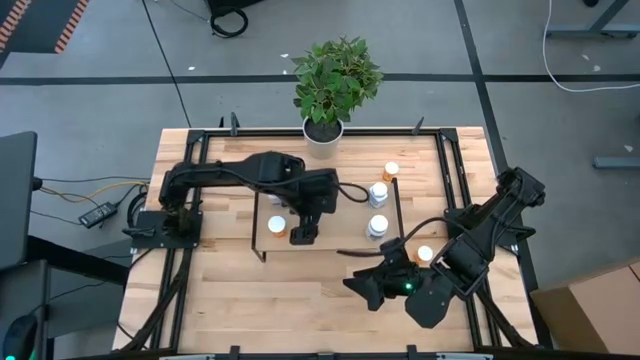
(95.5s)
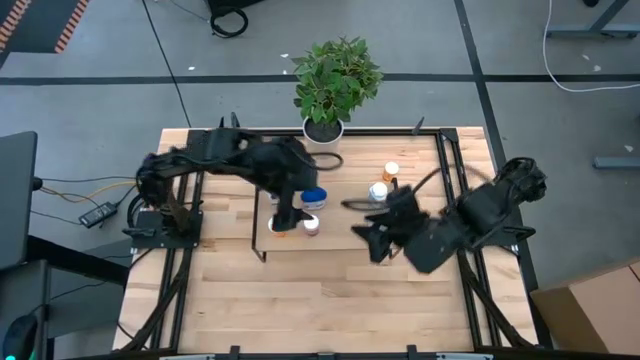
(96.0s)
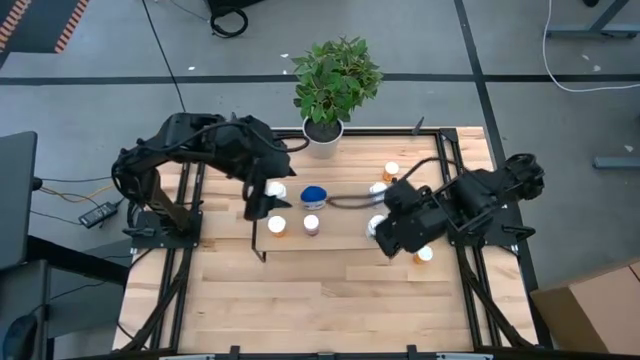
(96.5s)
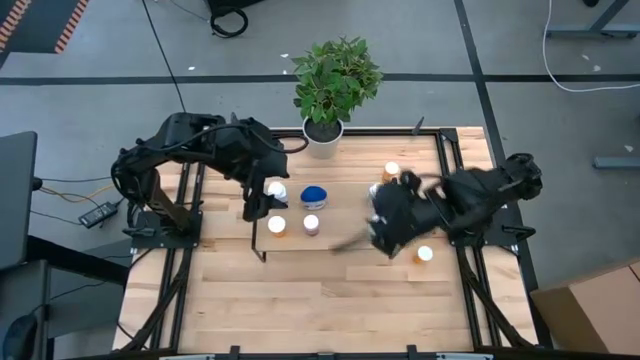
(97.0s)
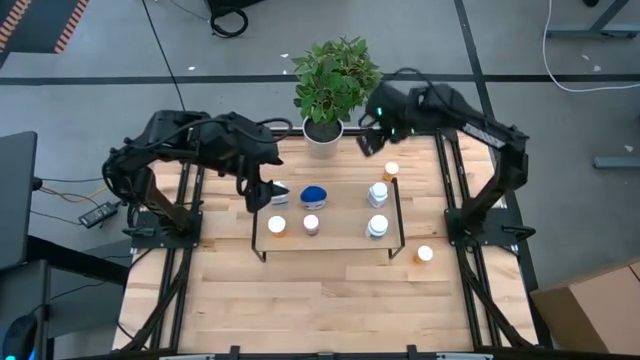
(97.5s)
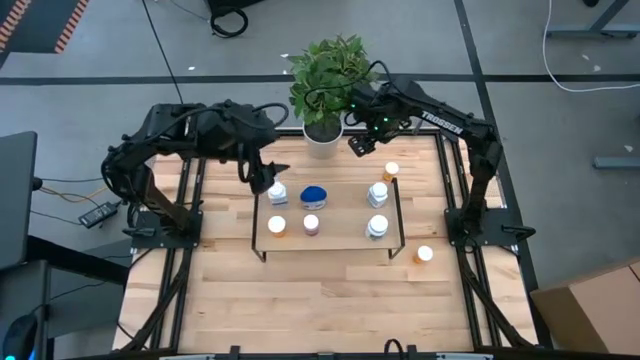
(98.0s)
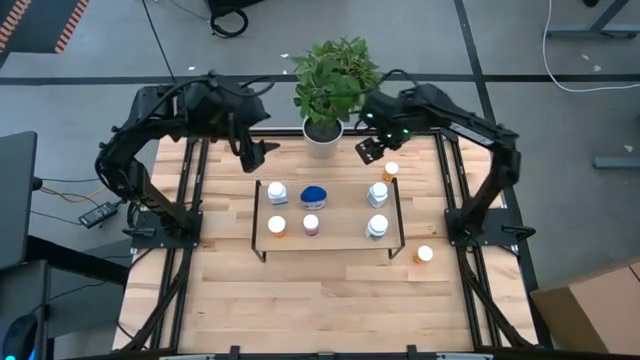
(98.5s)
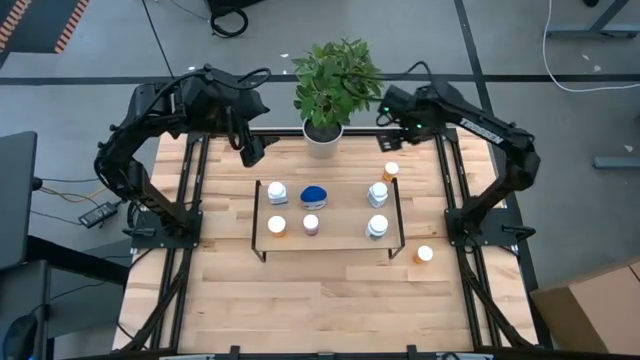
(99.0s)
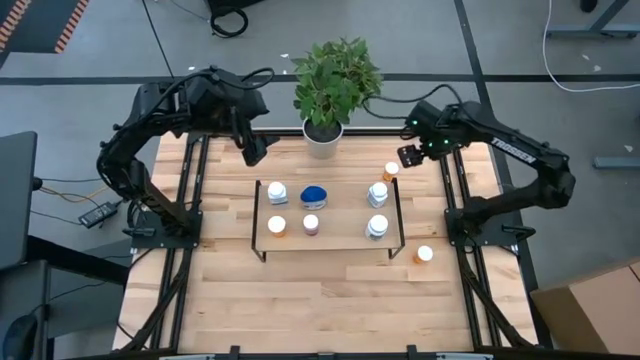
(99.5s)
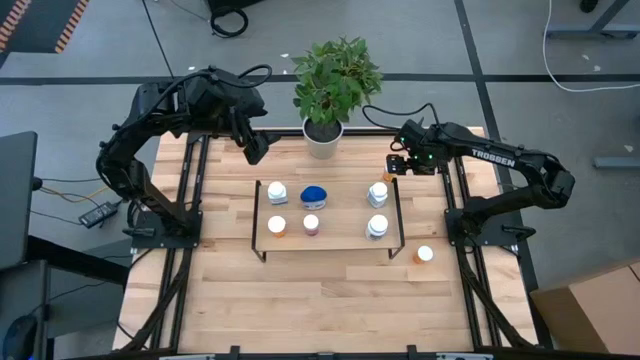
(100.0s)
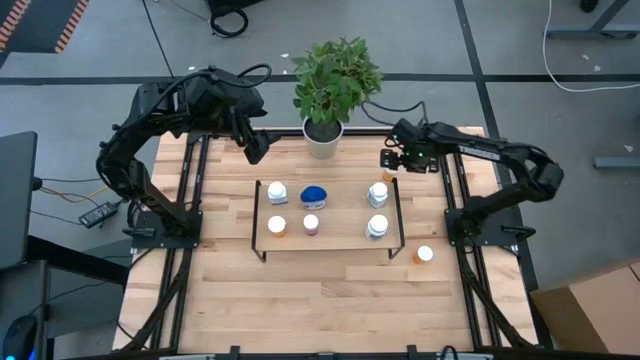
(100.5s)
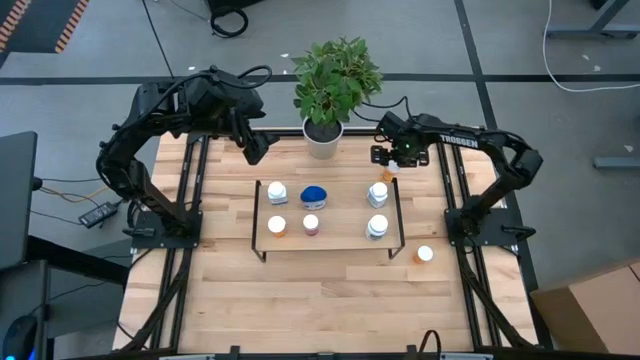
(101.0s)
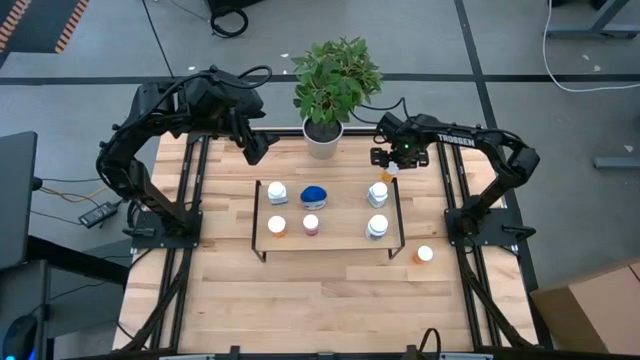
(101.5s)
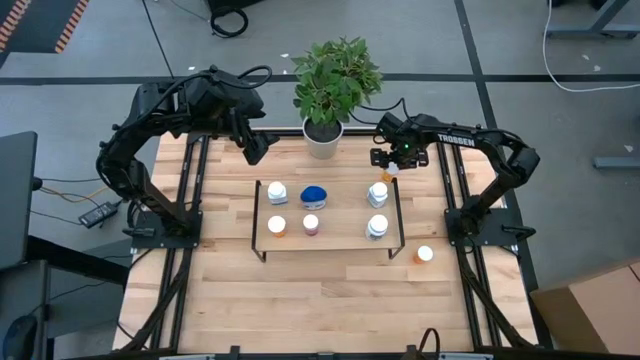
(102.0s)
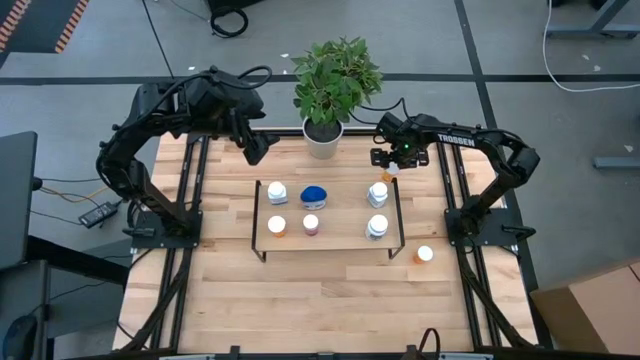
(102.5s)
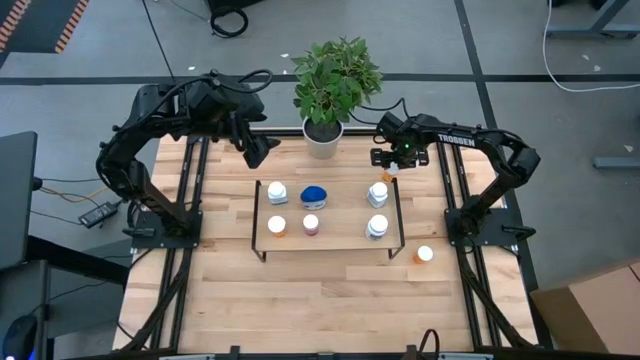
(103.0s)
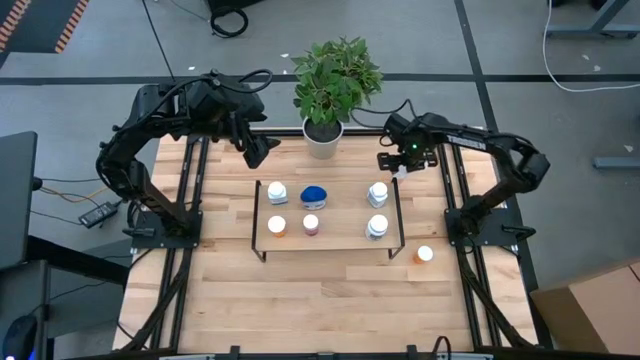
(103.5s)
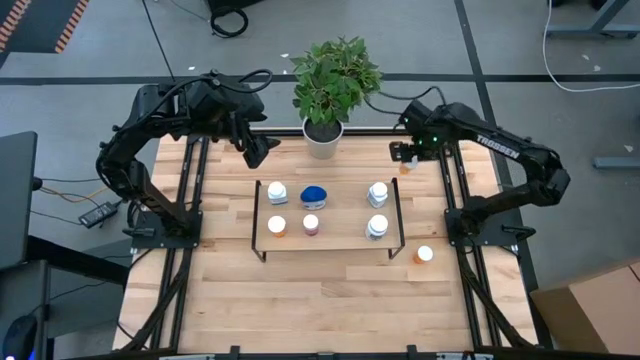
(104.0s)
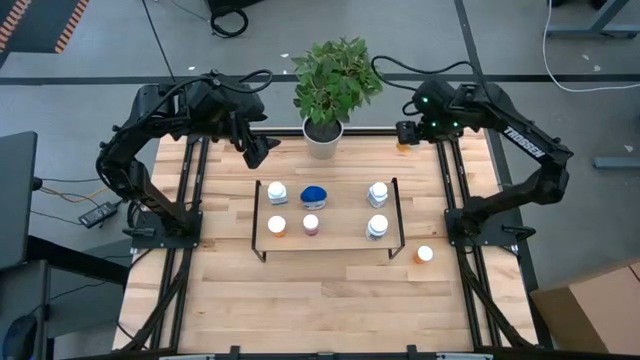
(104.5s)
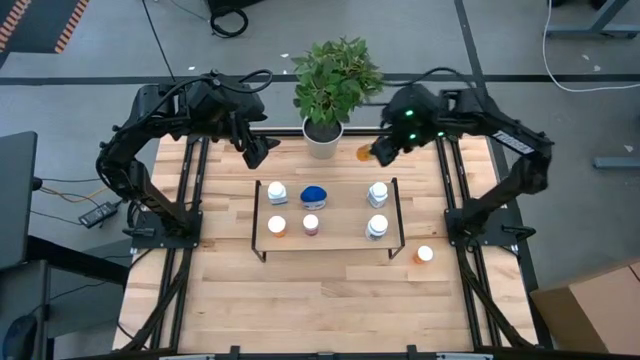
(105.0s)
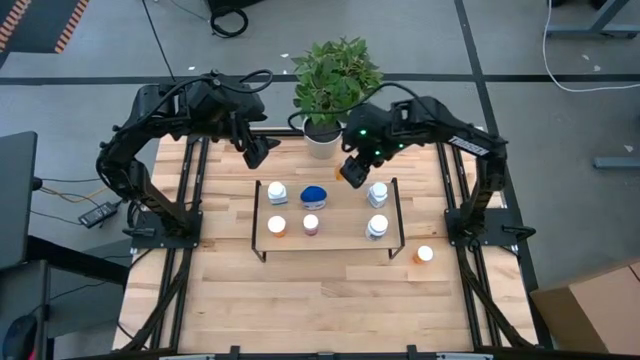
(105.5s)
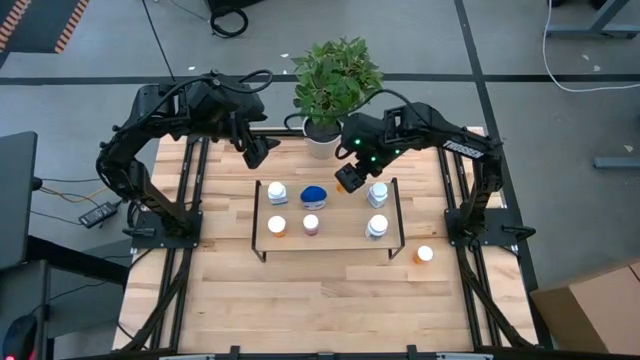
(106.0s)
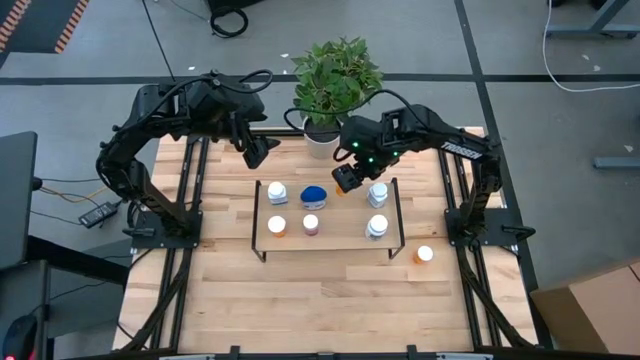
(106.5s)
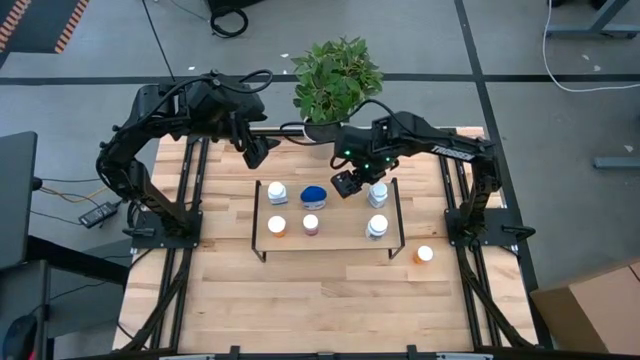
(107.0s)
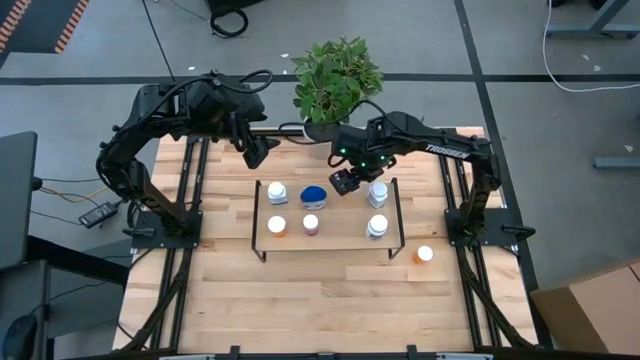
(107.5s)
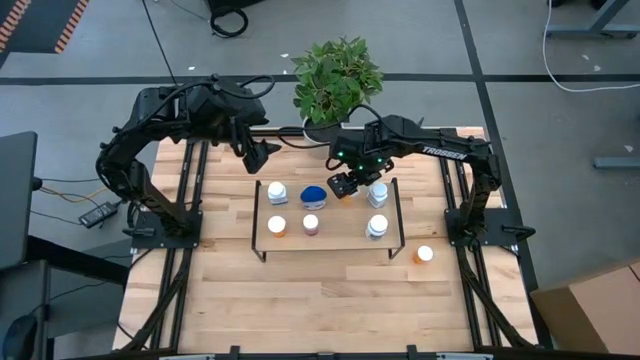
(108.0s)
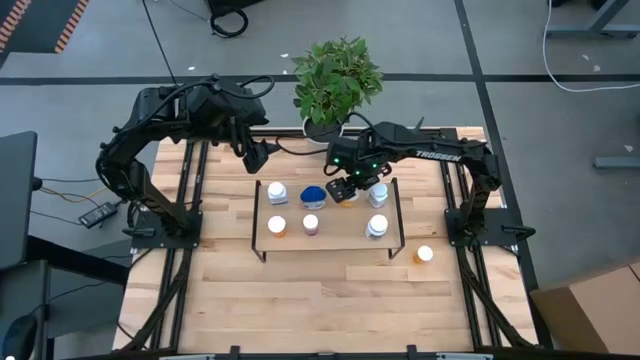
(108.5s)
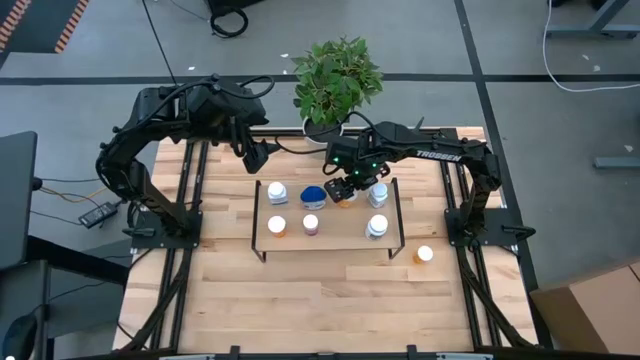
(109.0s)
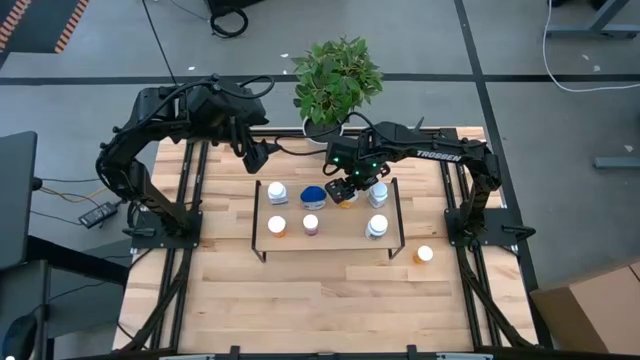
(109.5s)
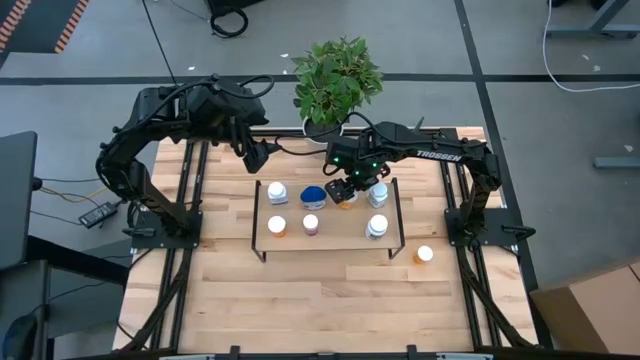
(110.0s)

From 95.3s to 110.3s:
Task: Pick and place medicine bottles onto shelf by color
Put the top orange pill bottle on the shelf

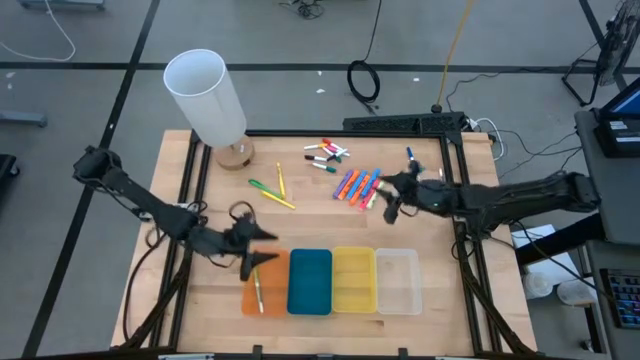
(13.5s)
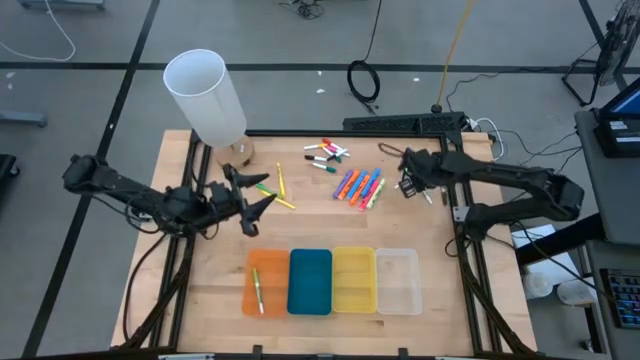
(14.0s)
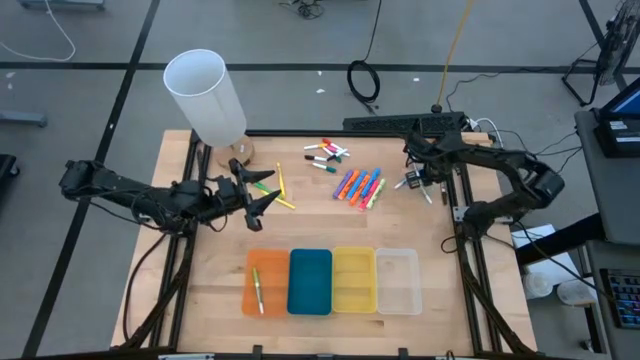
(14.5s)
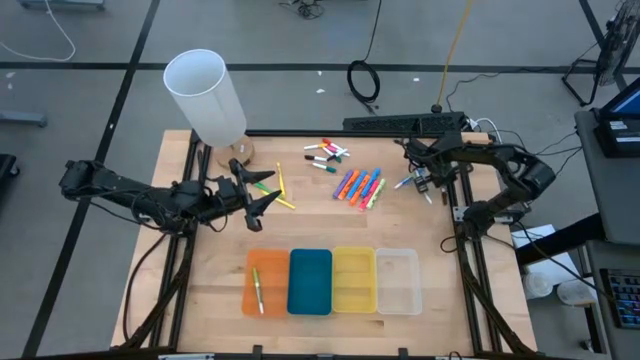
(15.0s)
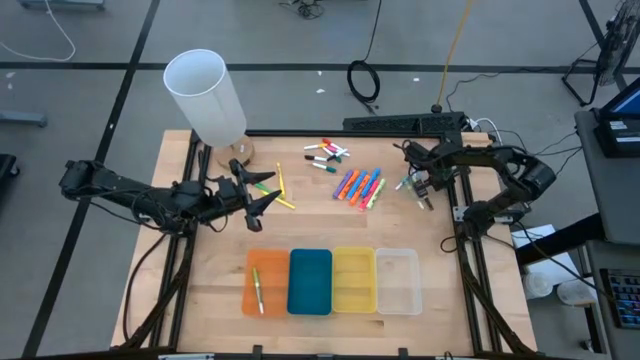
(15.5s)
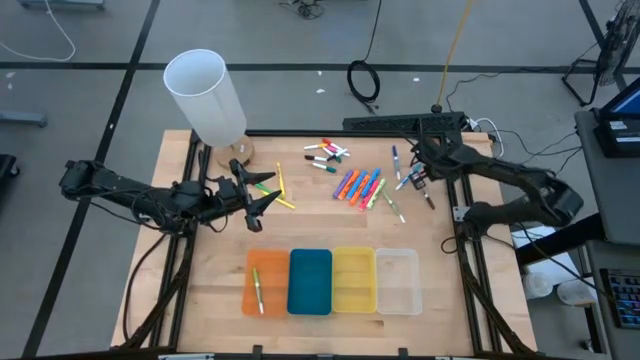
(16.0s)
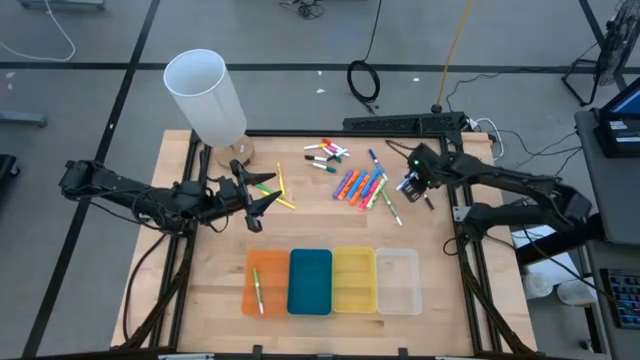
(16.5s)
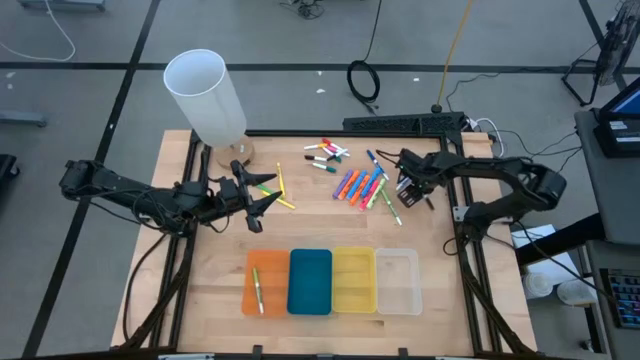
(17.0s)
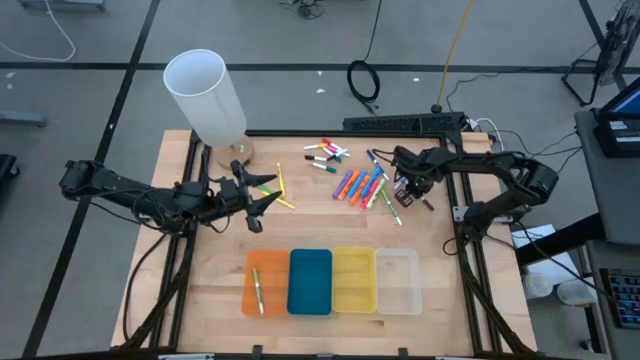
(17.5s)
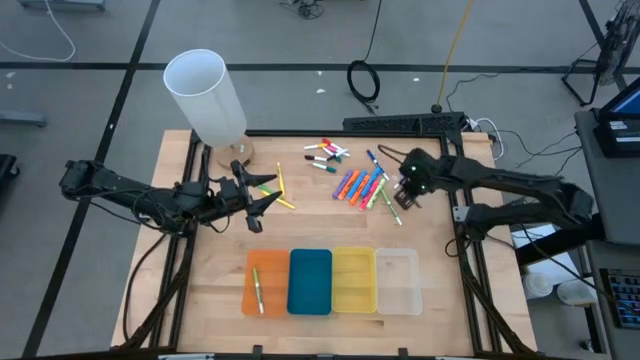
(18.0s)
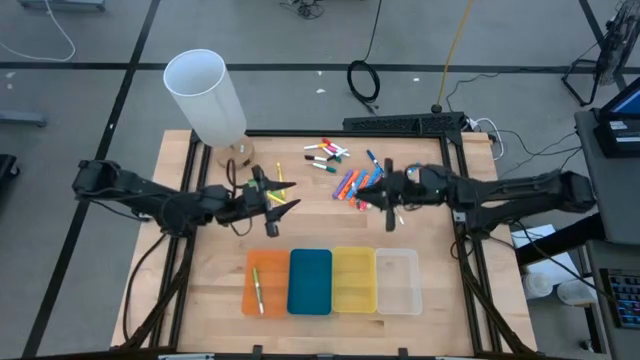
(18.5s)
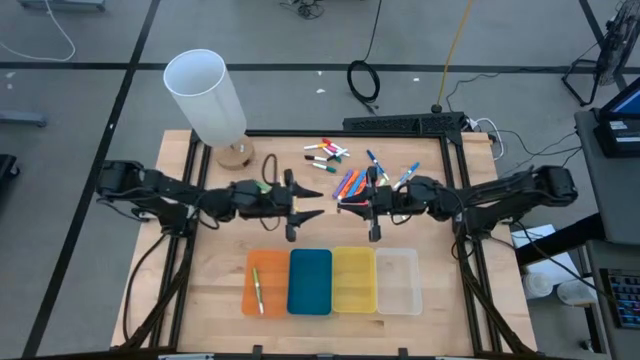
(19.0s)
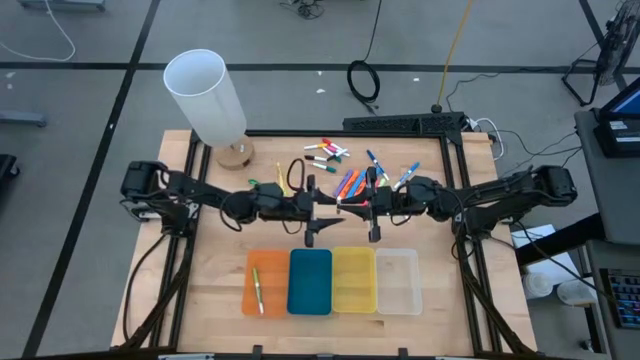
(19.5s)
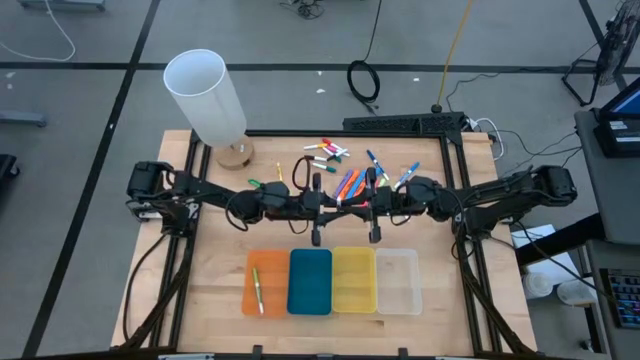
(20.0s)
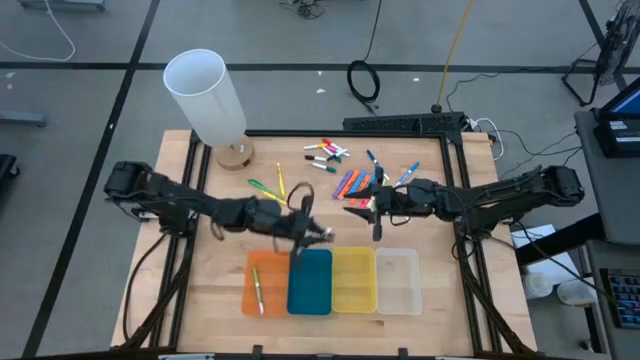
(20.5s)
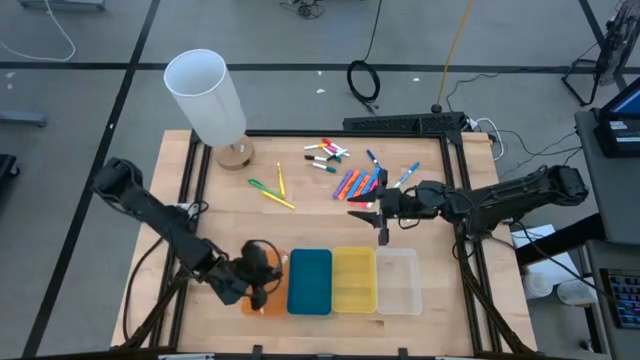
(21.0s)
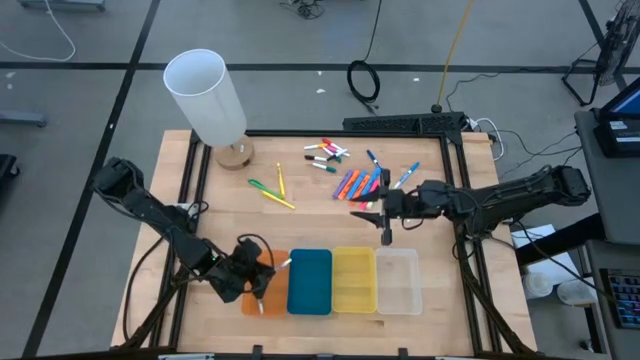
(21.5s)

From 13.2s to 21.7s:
Task: Pick & Place Markers
Put the brown marker pen into the orange bin
